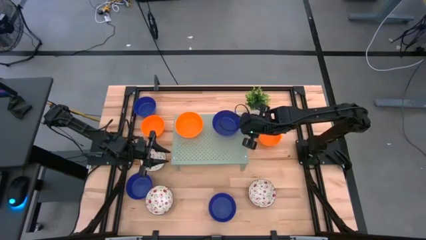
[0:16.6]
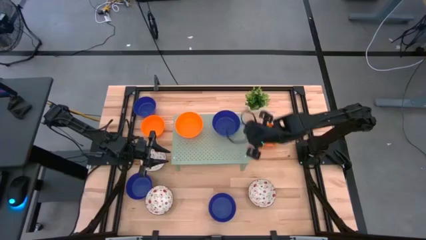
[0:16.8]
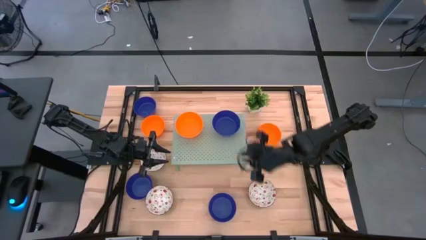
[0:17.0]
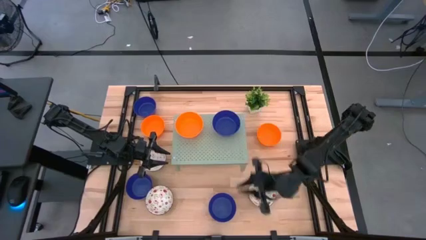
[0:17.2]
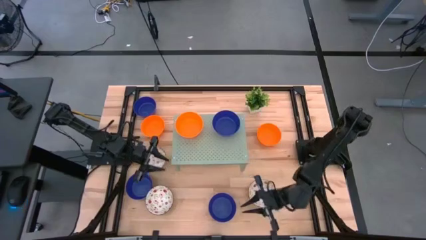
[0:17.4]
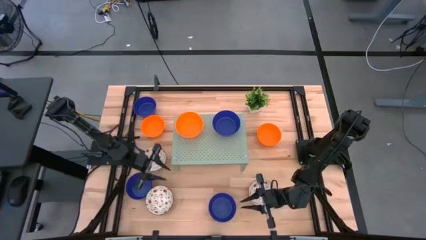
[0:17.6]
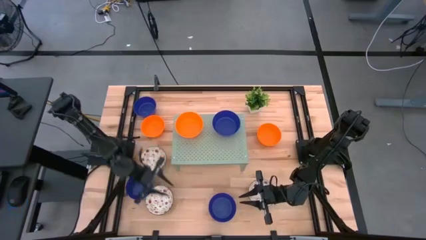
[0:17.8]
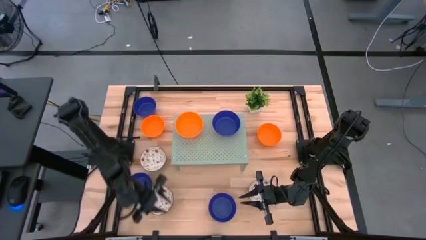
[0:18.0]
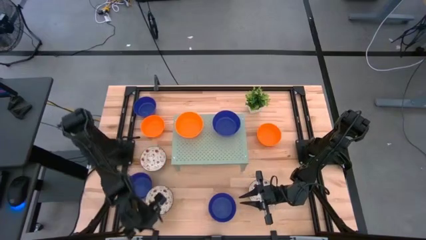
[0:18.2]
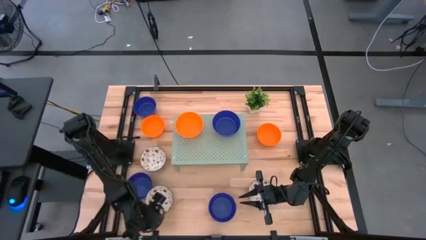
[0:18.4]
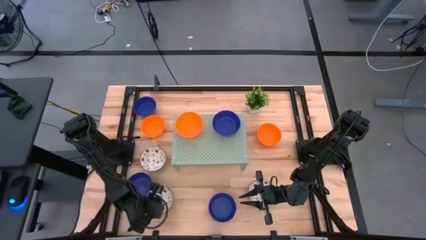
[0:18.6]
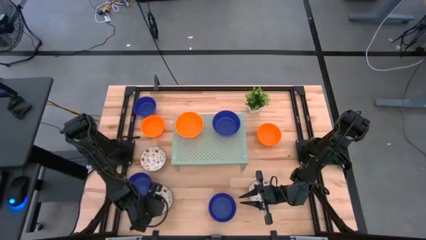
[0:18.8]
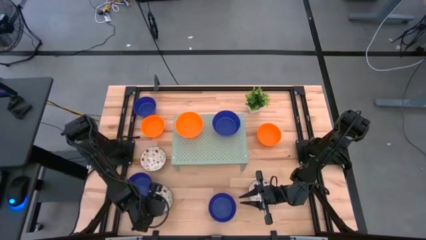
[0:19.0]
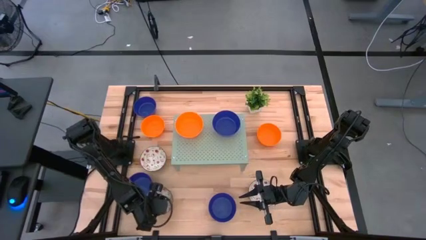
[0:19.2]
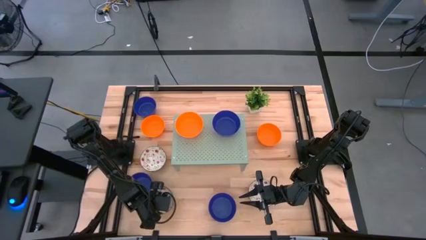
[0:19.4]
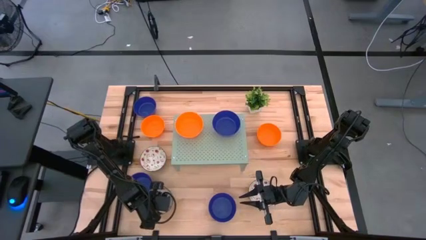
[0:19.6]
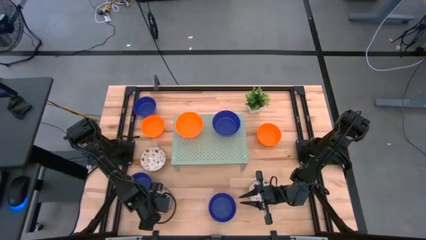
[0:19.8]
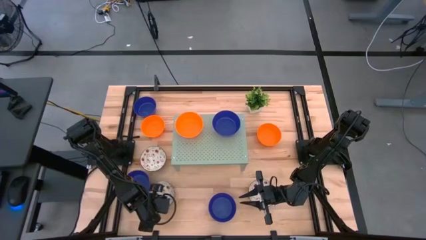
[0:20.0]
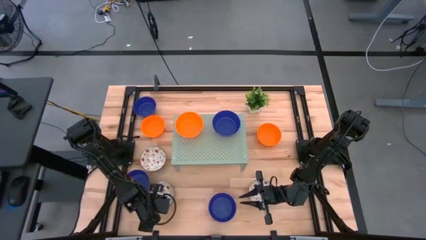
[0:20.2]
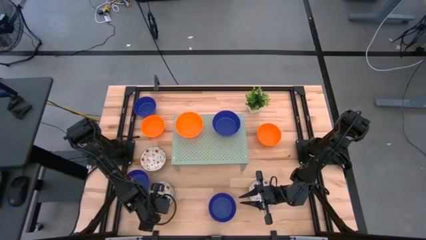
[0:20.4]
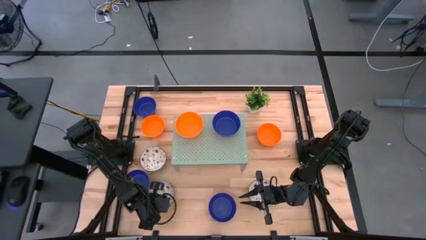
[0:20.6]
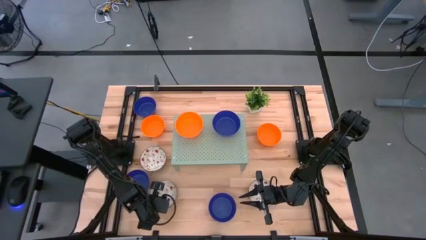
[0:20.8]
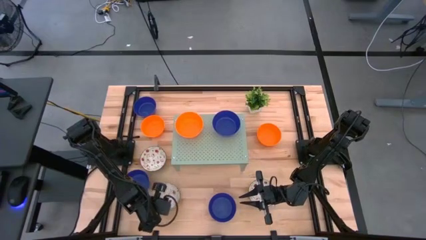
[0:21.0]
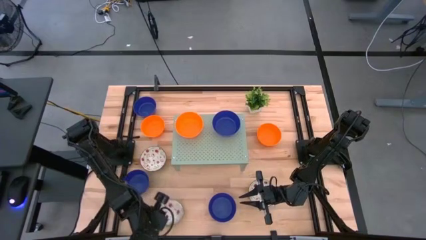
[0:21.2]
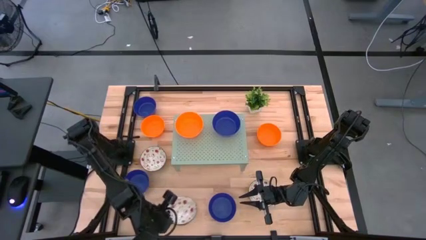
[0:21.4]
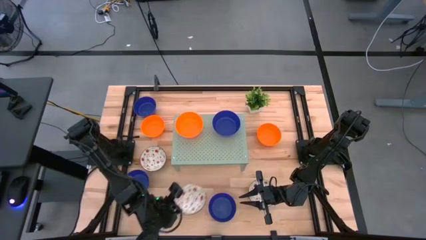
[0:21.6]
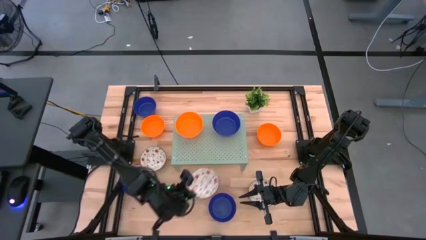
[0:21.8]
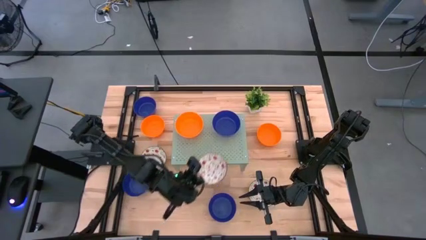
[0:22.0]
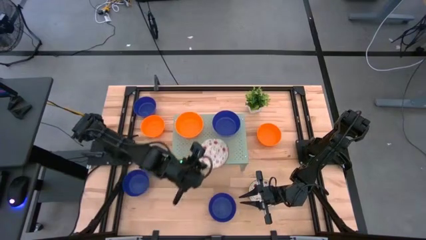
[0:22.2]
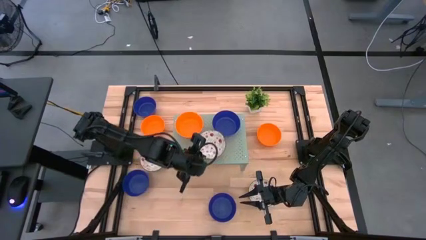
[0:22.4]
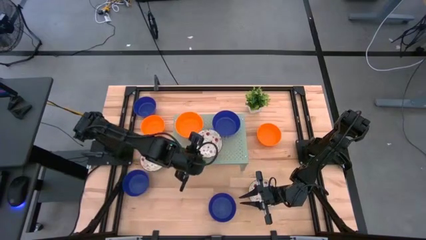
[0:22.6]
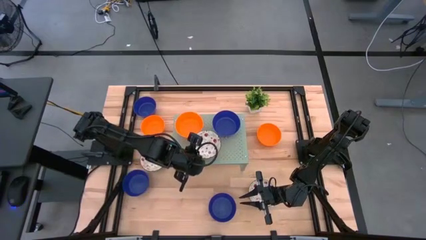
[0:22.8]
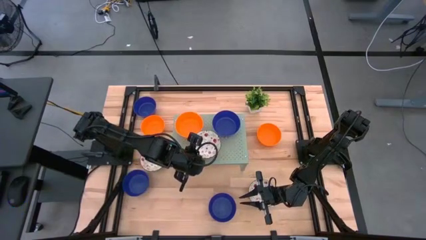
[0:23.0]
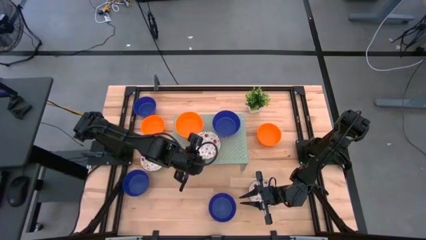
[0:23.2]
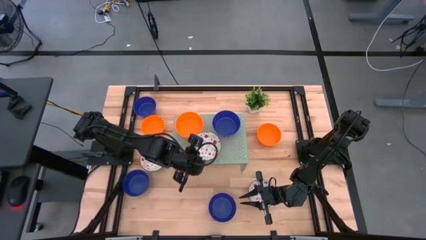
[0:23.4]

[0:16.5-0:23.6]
Task: Pick & Place Mini bowls
Put the white patterned bowl on the shelf

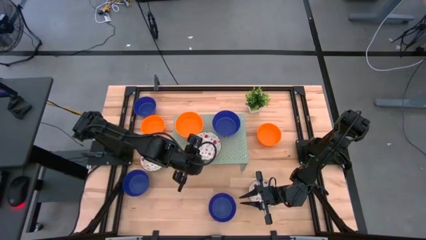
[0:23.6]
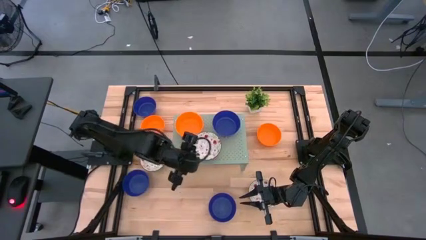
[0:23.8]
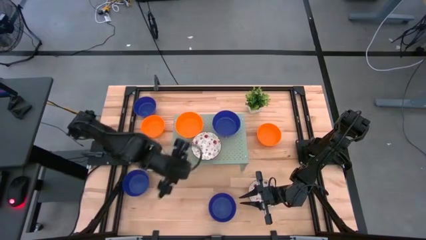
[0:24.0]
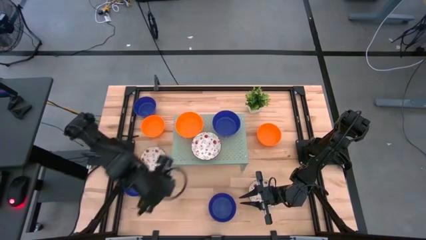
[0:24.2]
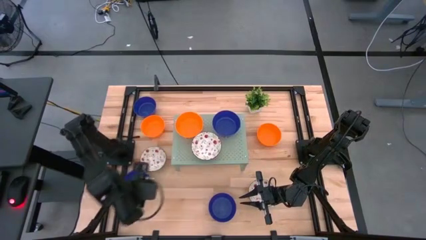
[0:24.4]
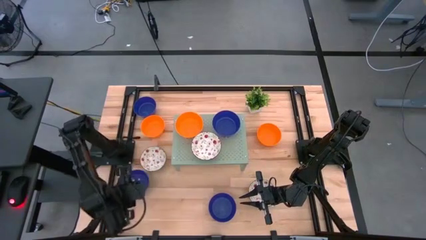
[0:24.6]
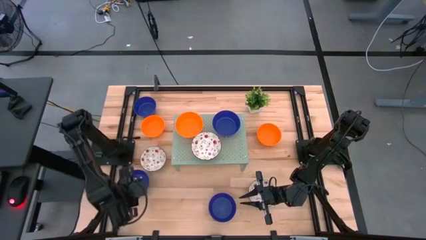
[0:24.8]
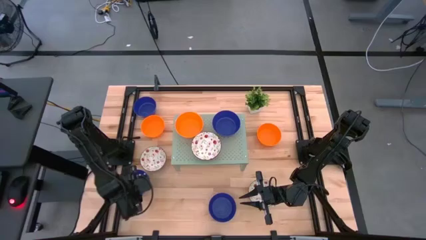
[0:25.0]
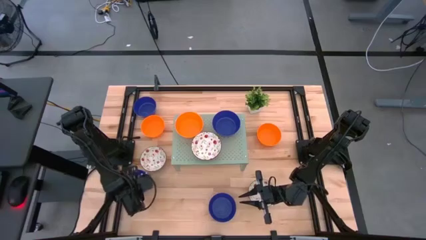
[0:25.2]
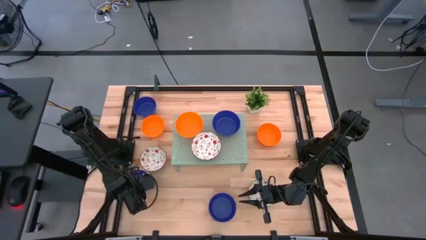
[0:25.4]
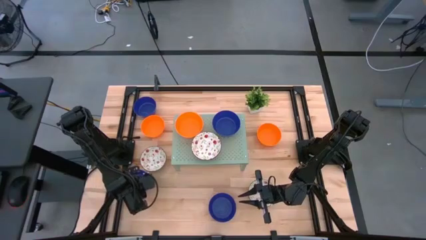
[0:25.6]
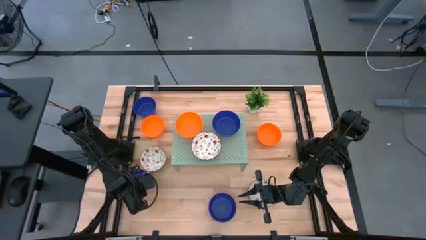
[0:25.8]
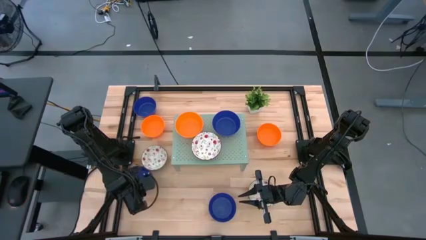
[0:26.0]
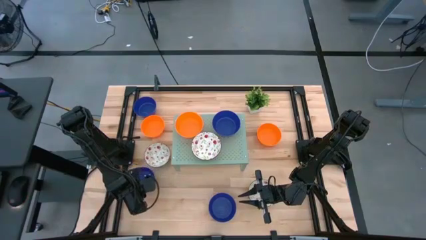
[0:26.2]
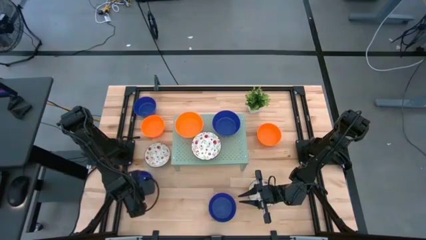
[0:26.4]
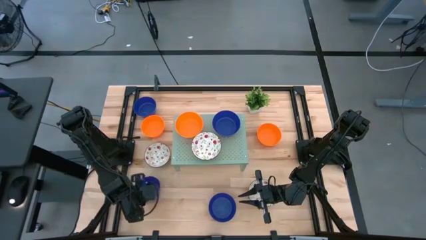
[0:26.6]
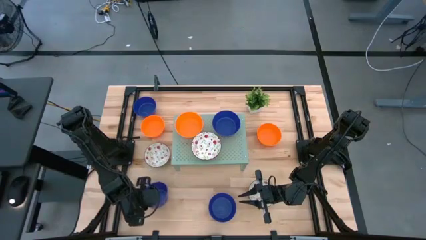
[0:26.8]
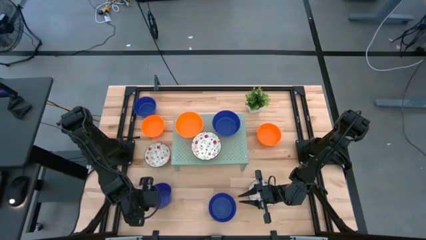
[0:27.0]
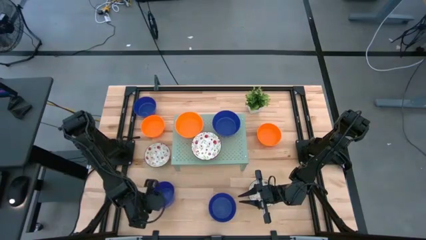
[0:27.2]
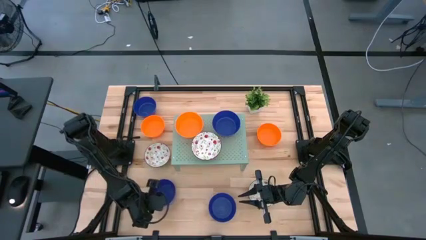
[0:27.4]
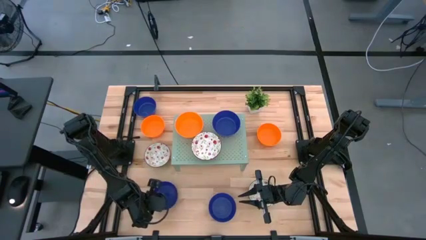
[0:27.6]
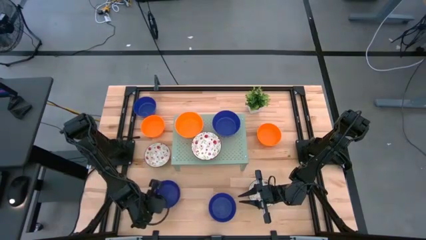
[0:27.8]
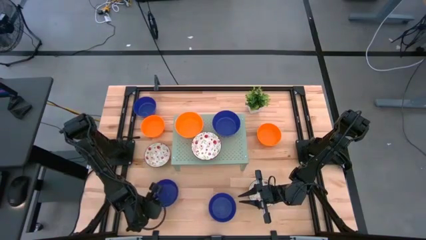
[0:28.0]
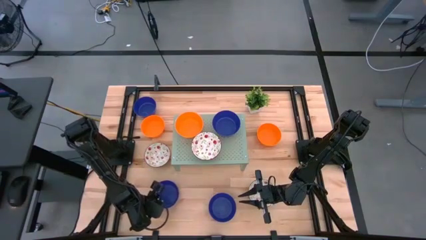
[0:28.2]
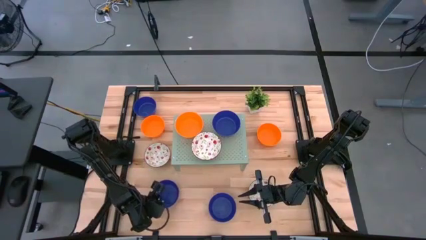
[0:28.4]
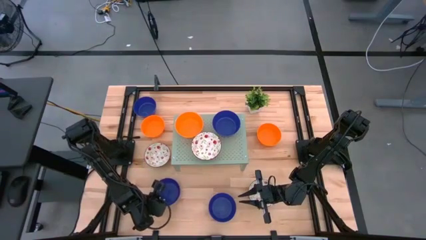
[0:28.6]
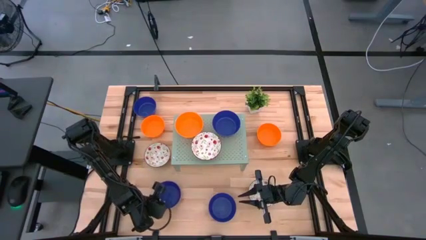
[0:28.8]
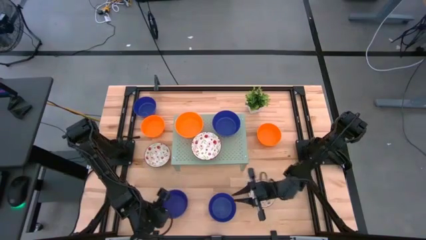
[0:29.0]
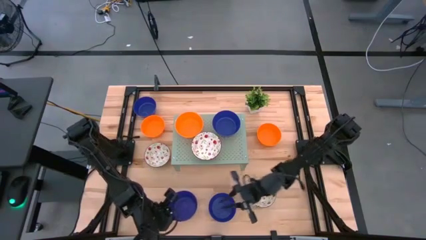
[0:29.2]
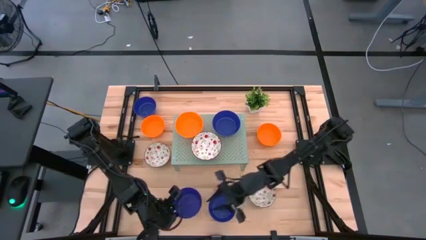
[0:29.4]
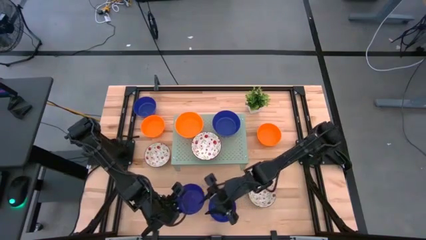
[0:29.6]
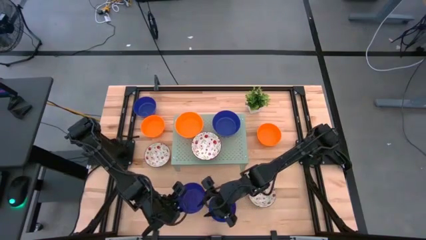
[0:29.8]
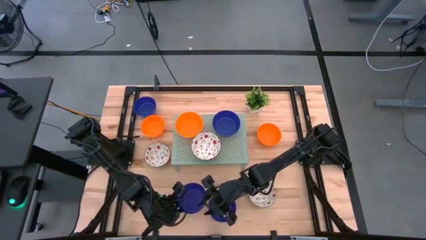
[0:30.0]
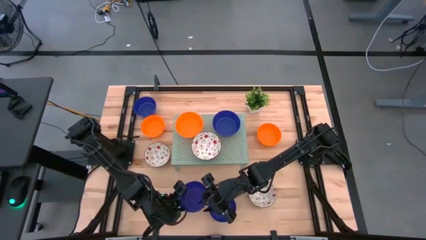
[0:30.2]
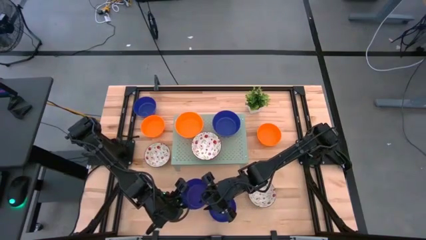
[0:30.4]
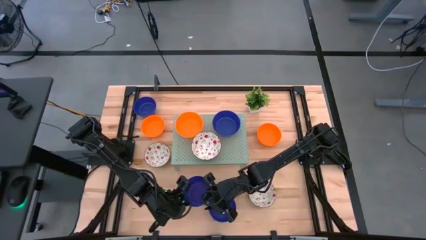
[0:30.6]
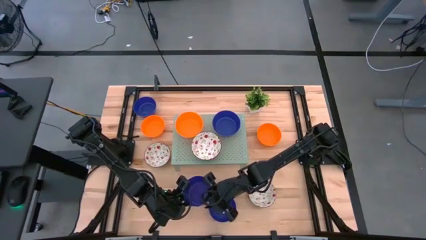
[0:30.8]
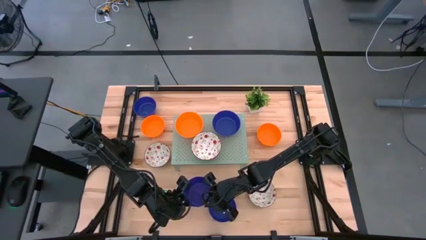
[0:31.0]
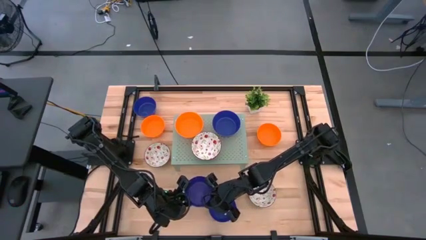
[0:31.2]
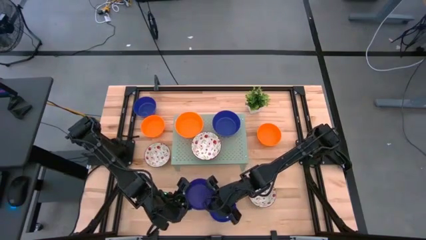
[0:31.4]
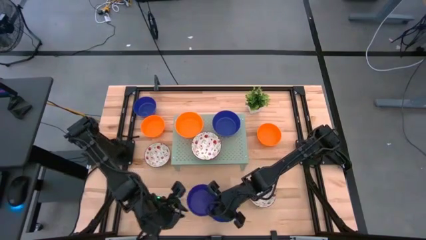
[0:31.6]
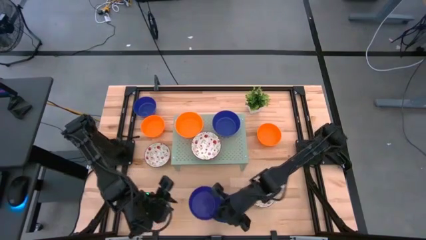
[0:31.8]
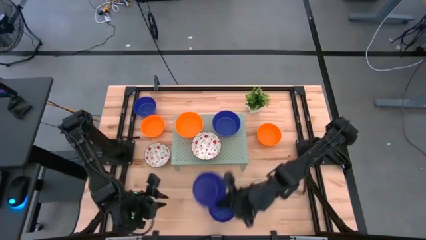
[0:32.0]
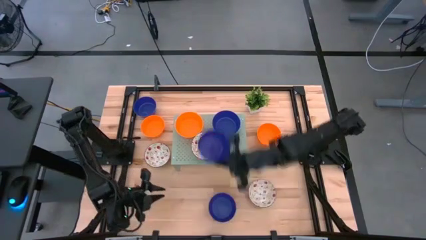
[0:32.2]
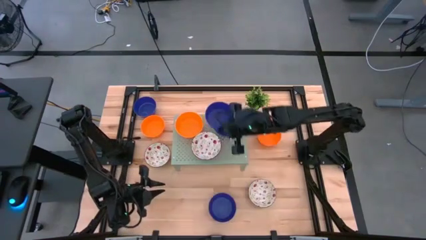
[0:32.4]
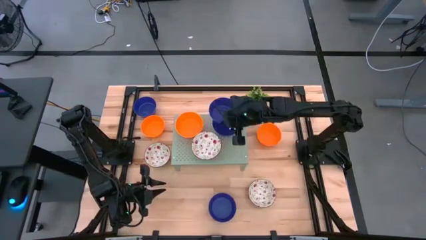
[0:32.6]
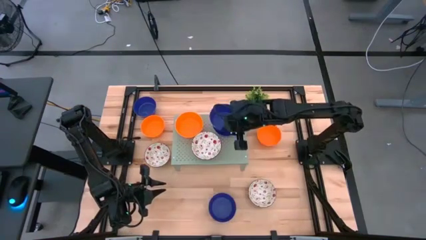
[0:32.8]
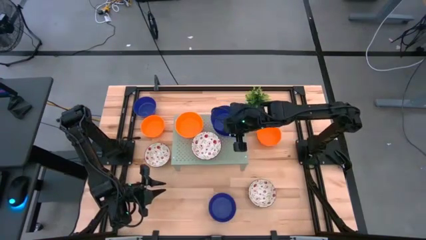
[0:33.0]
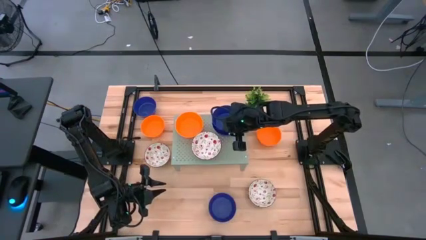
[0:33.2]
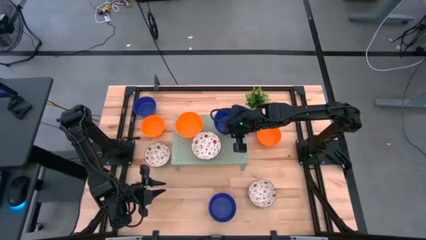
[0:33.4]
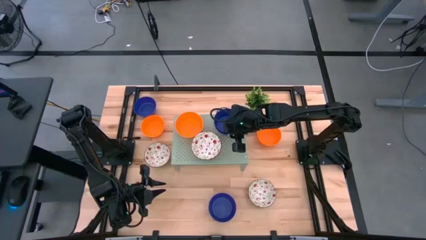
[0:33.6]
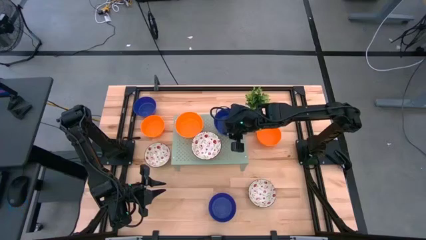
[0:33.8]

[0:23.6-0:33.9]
Stack the blue bowl on top of the blue bowl on the shelf
